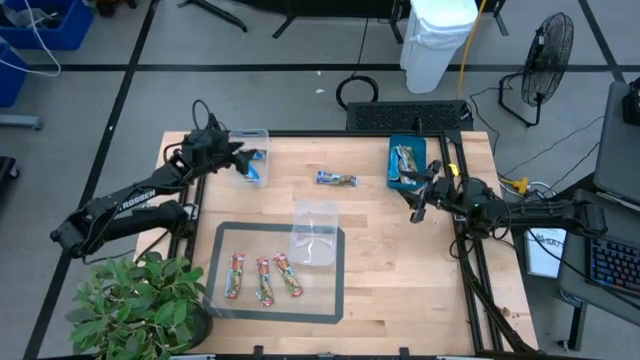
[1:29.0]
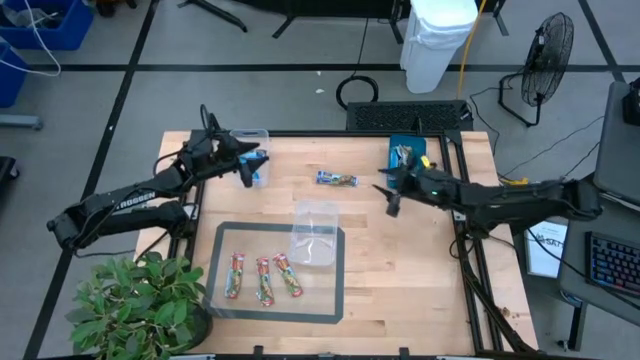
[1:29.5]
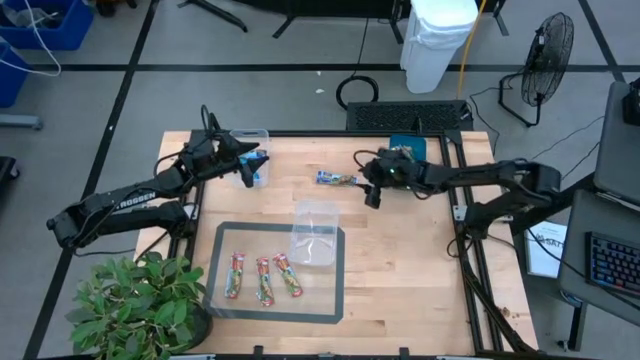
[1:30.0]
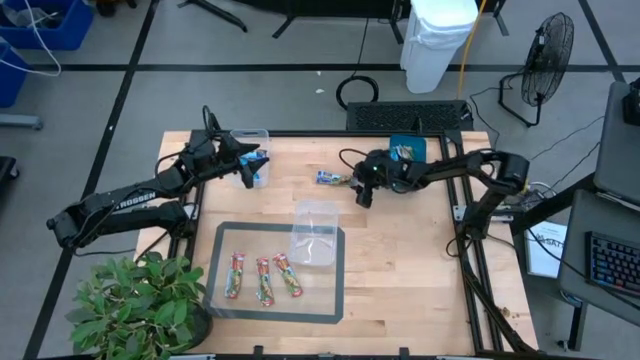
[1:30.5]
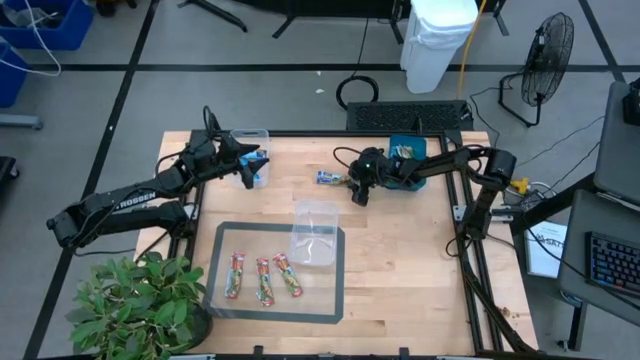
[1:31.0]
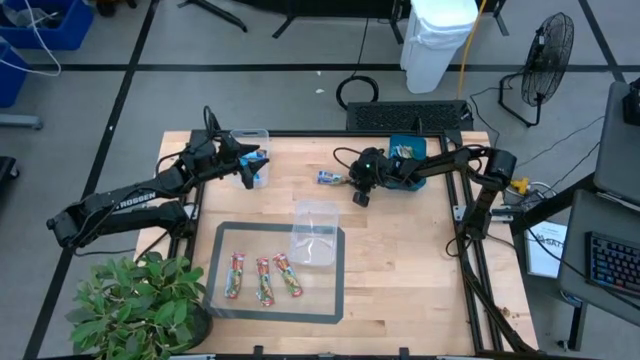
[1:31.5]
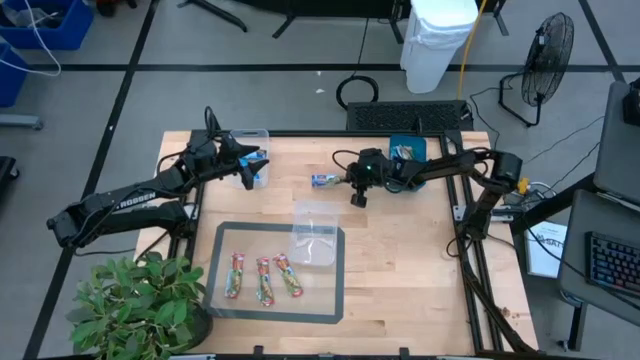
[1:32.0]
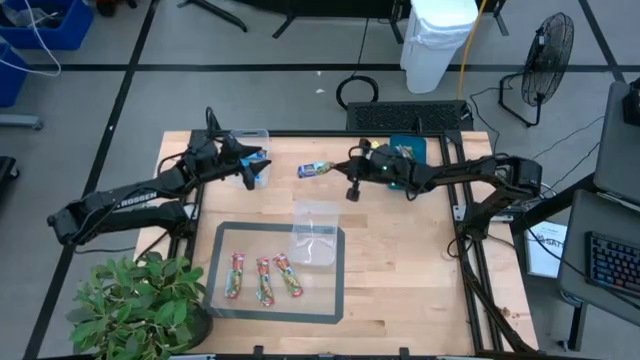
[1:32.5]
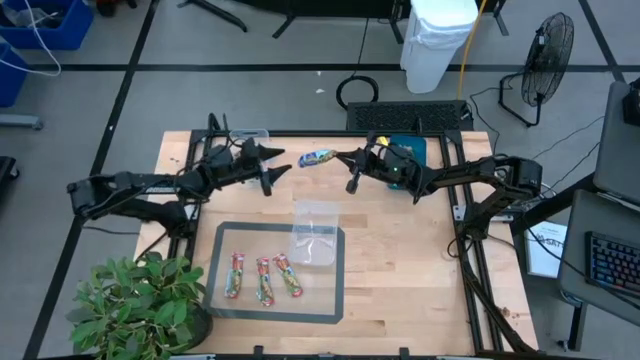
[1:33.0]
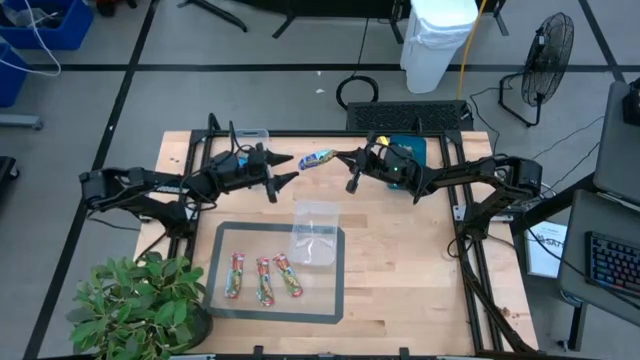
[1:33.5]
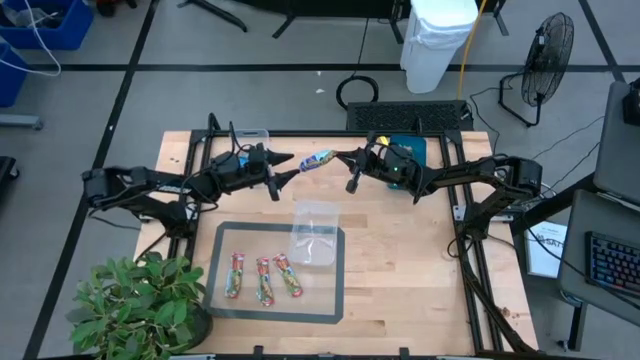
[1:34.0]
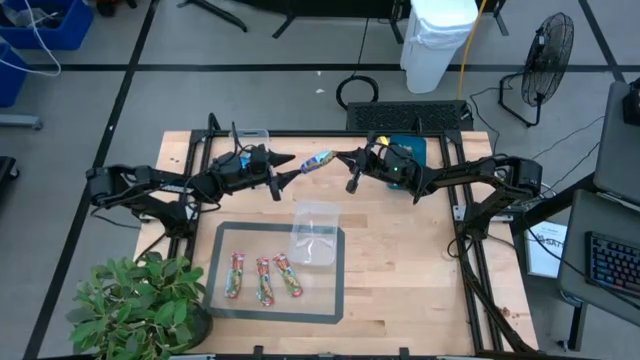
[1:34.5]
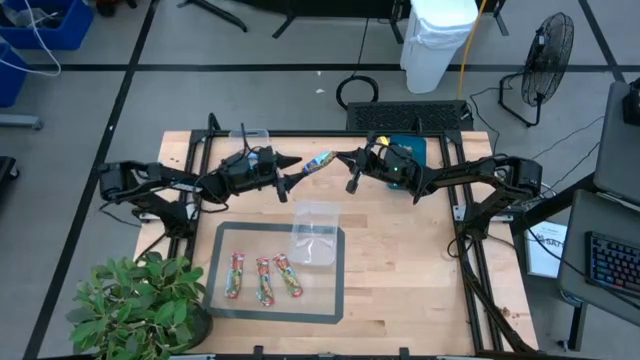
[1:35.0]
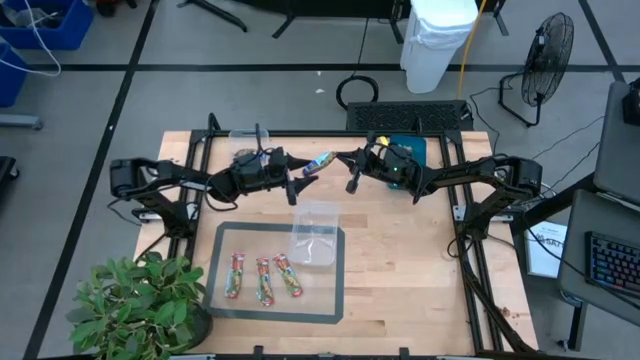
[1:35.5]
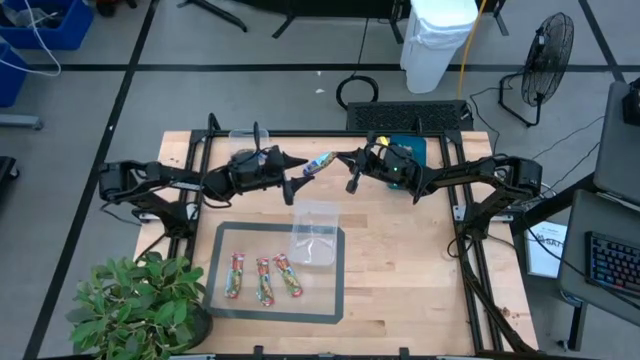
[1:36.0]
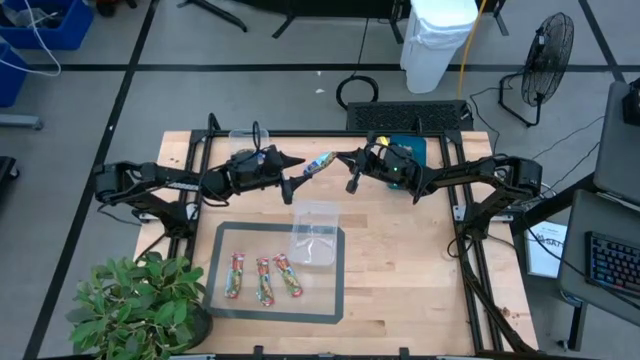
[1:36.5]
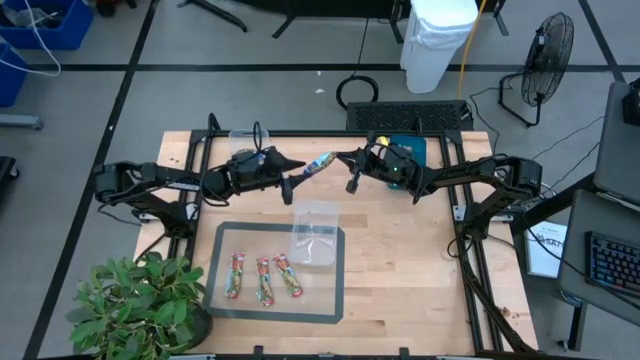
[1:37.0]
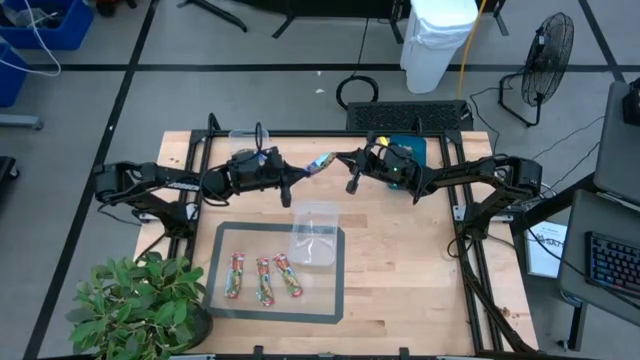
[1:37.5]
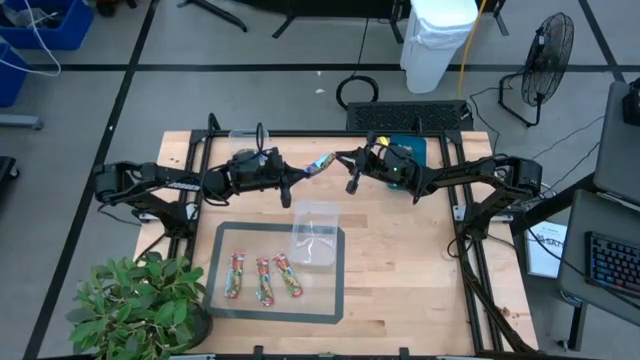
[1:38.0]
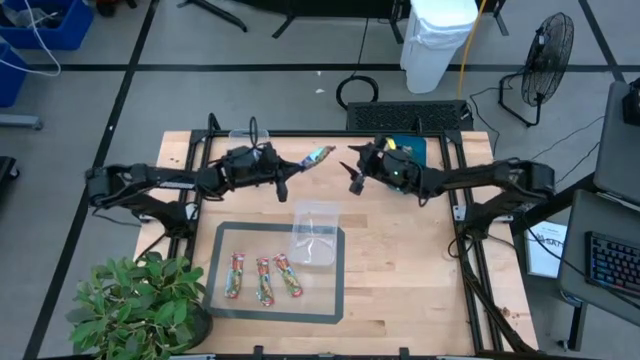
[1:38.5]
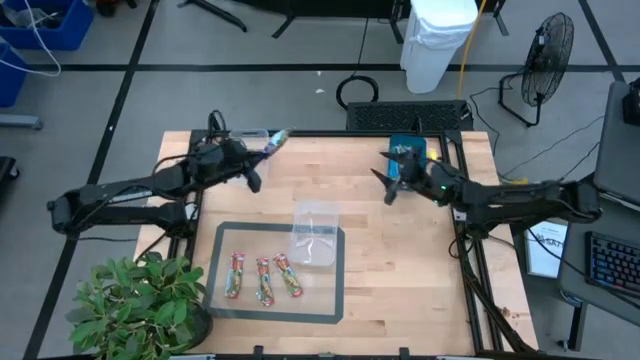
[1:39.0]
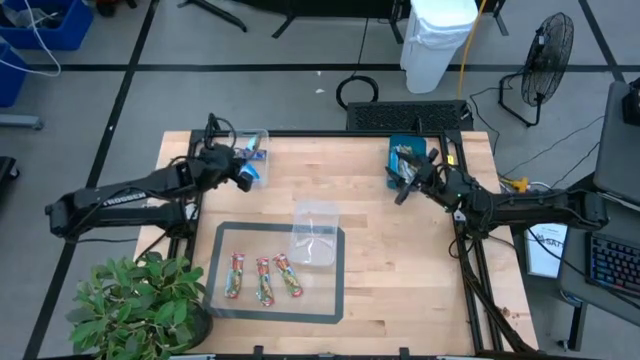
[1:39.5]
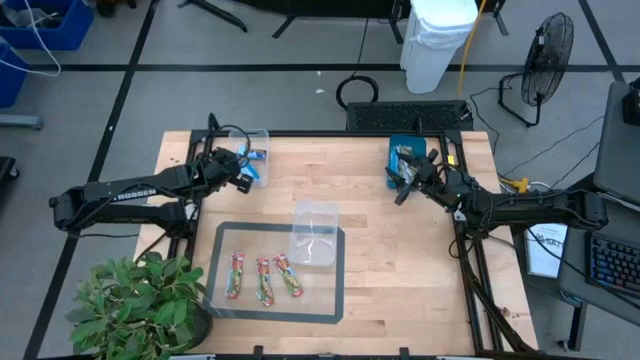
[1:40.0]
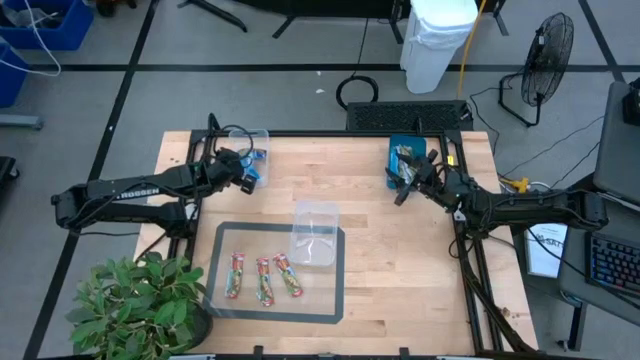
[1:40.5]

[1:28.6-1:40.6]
Task: Pick and place Granola Bars by type
Put the blue granola bar into the top blue bin

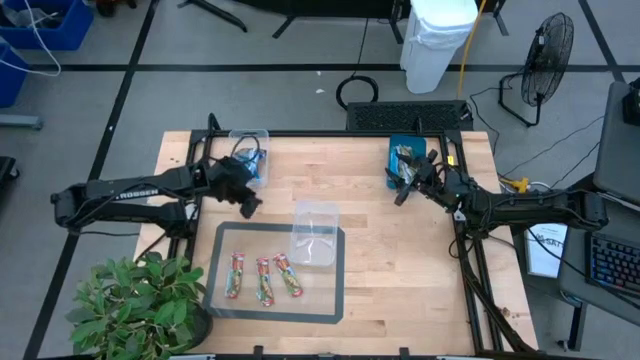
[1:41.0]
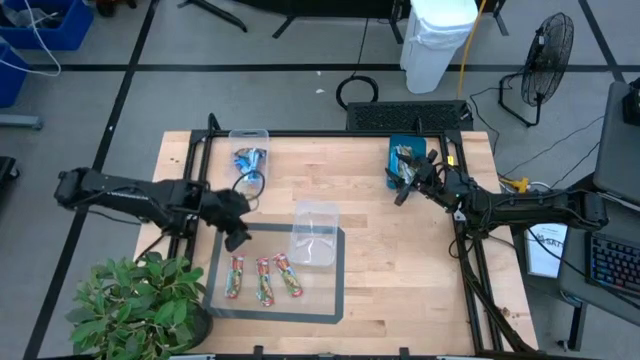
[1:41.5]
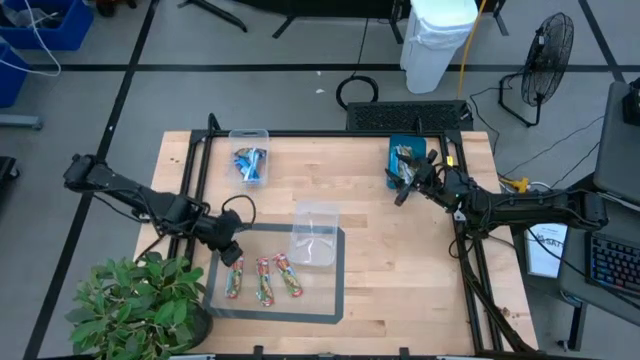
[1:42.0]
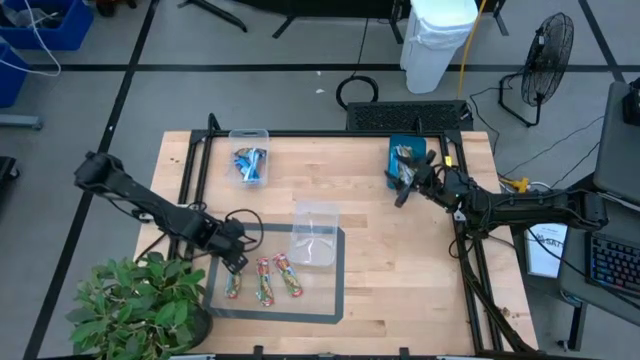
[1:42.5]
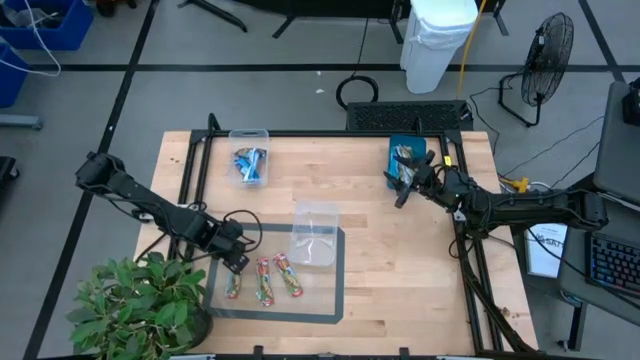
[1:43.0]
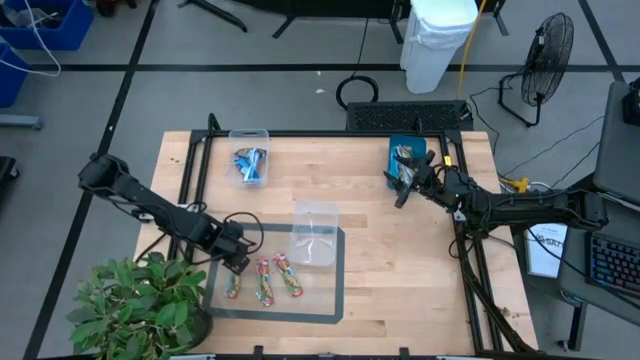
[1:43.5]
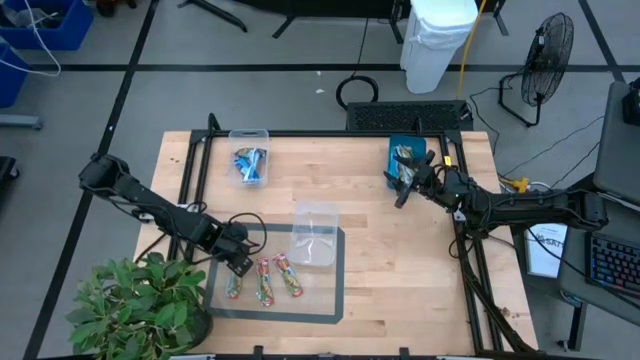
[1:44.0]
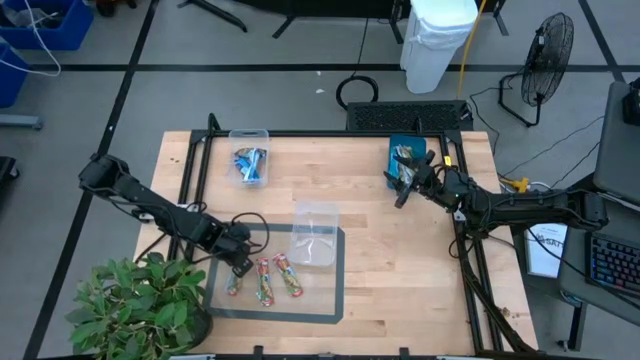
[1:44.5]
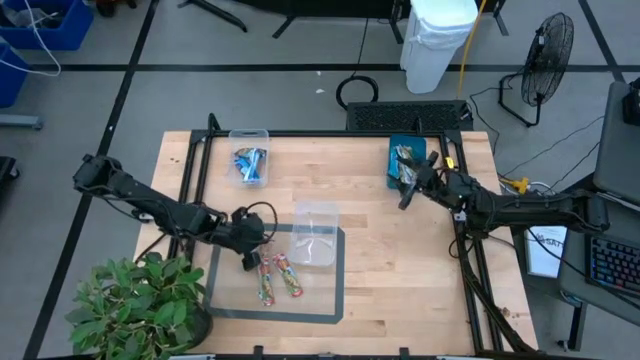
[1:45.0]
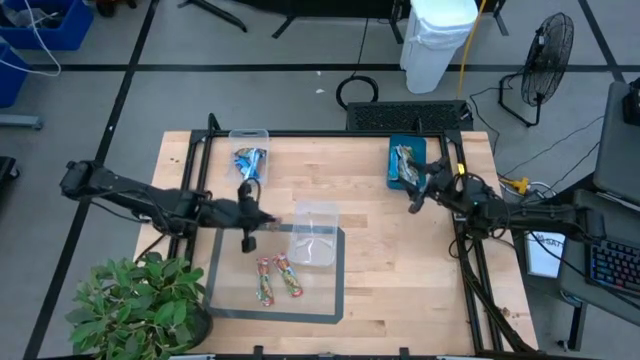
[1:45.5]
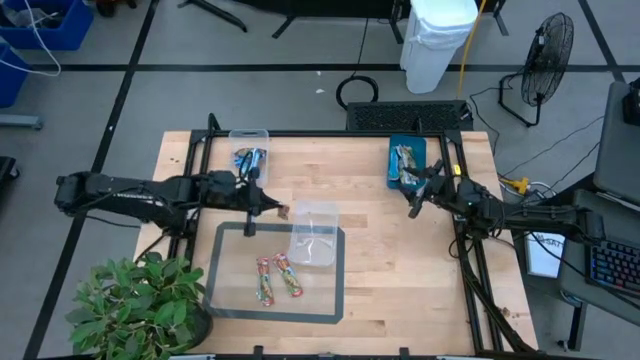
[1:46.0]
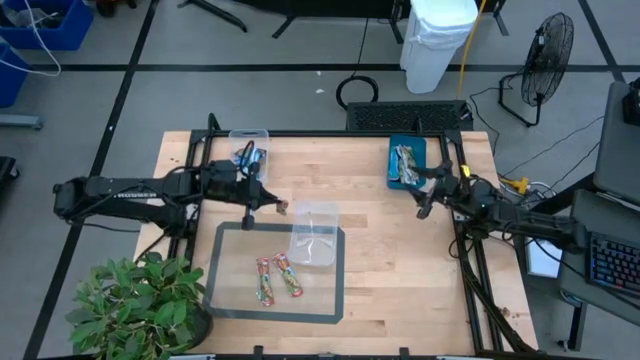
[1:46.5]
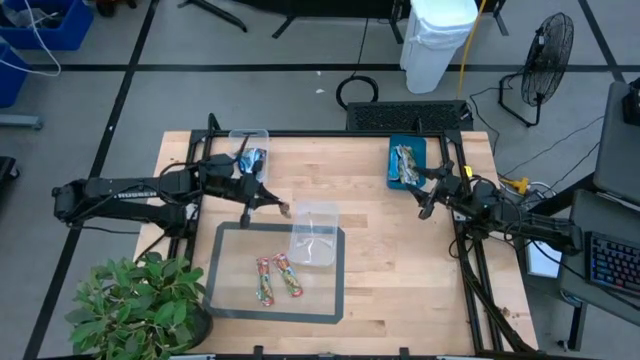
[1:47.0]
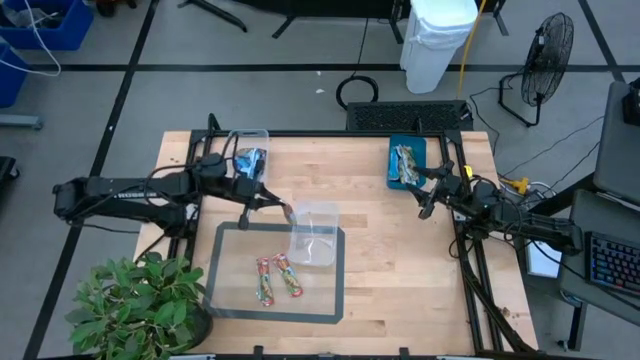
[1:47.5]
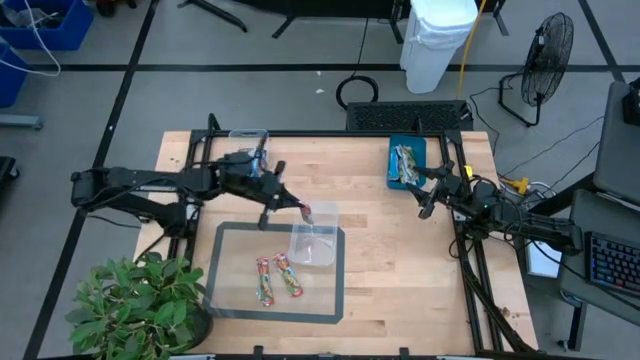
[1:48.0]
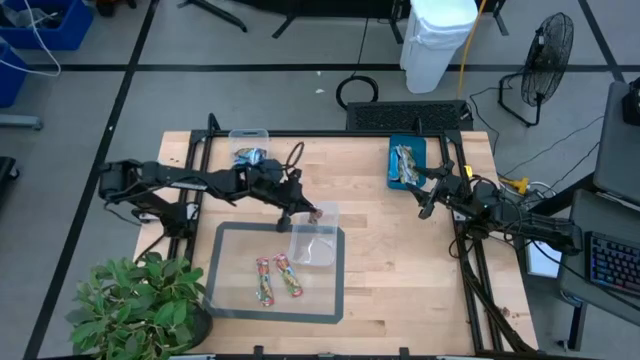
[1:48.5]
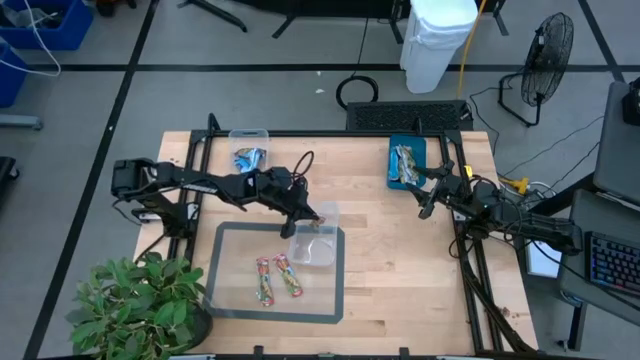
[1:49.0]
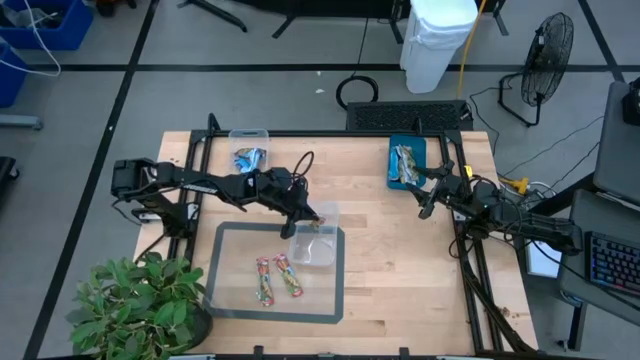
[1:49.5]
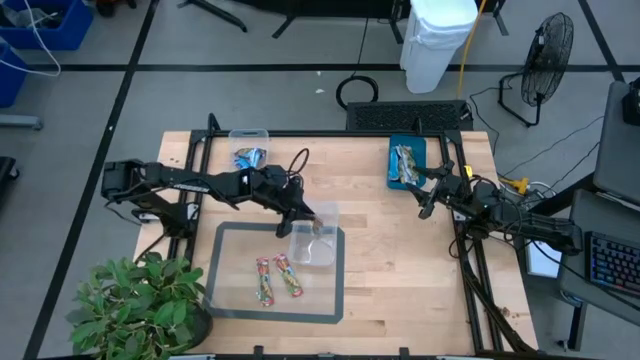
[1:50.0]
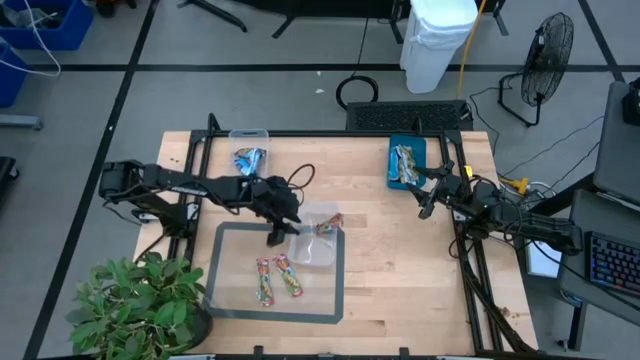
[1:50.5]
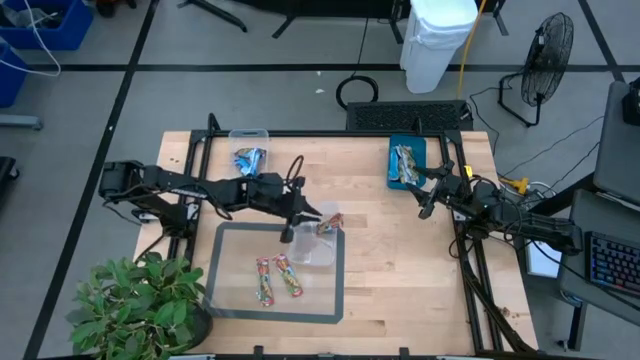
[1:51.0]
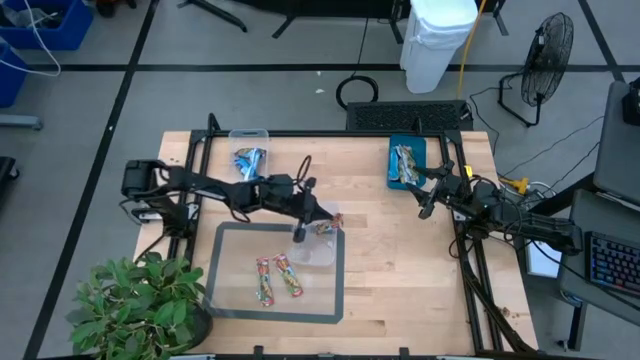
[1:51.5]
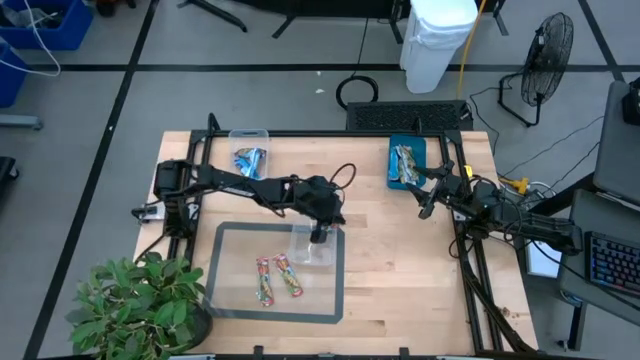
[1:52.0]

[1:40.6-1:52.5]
Put the red granola bar into the bottom transparent bin
